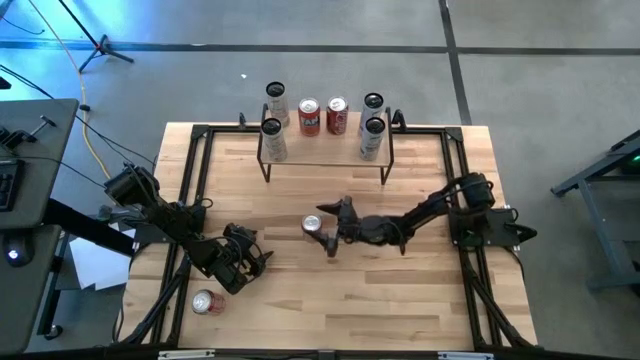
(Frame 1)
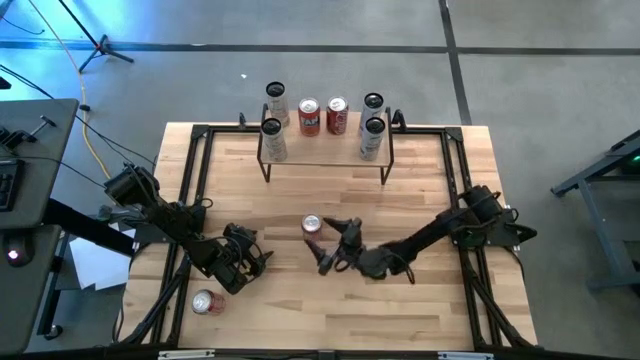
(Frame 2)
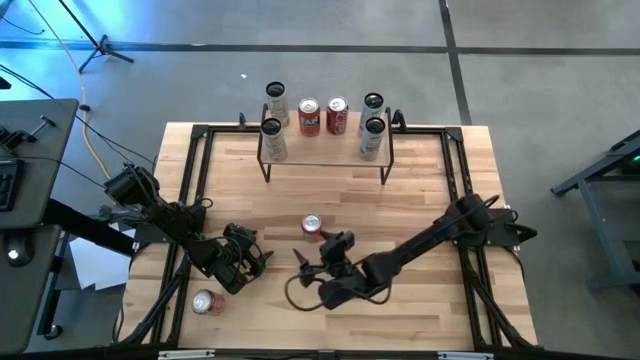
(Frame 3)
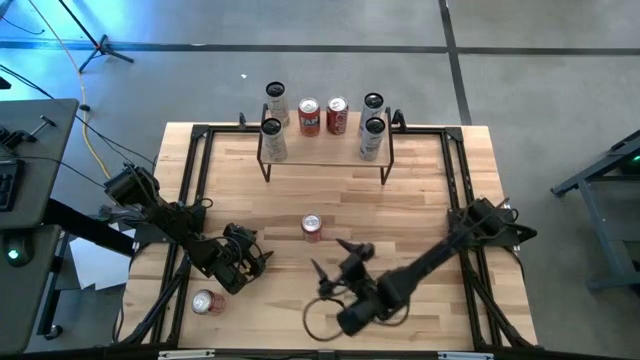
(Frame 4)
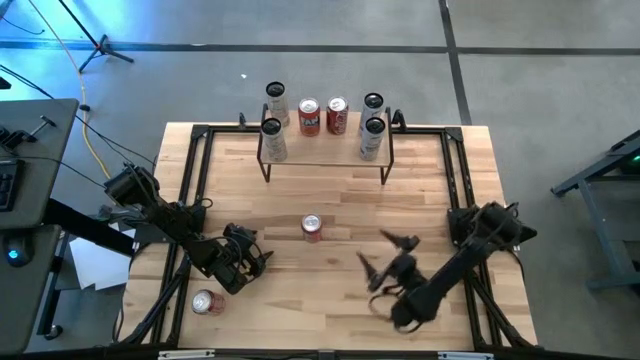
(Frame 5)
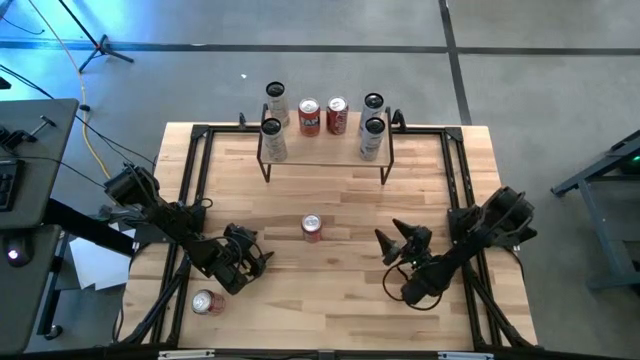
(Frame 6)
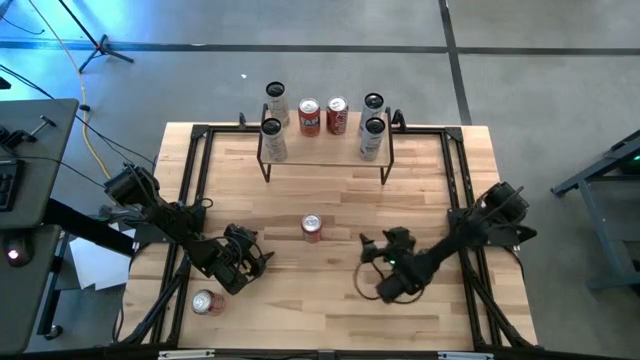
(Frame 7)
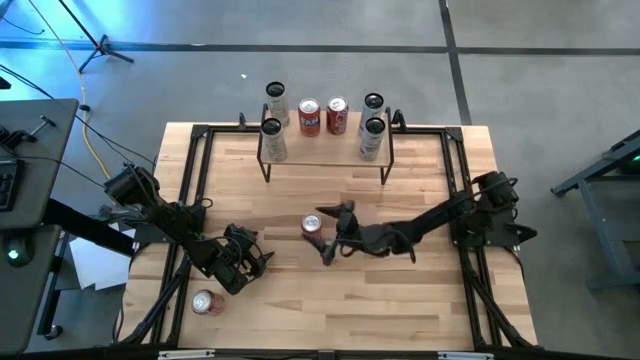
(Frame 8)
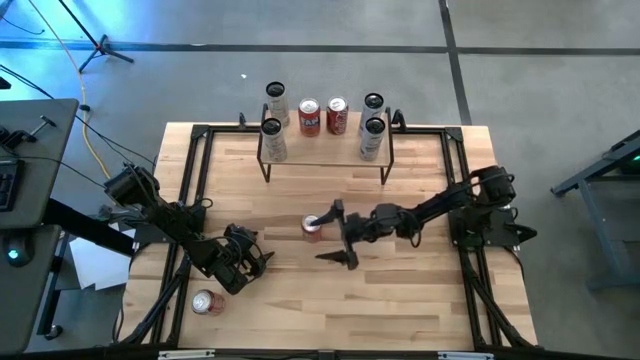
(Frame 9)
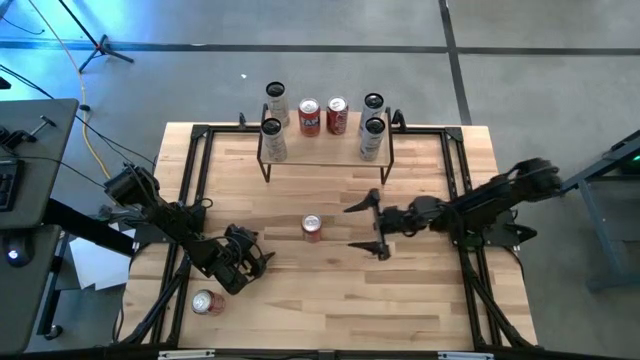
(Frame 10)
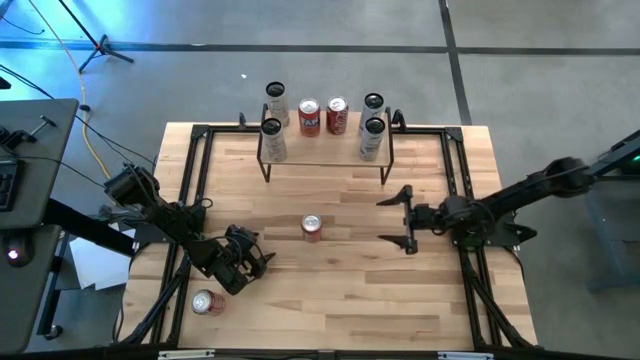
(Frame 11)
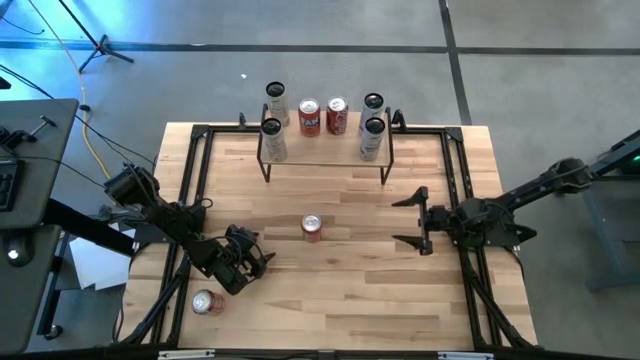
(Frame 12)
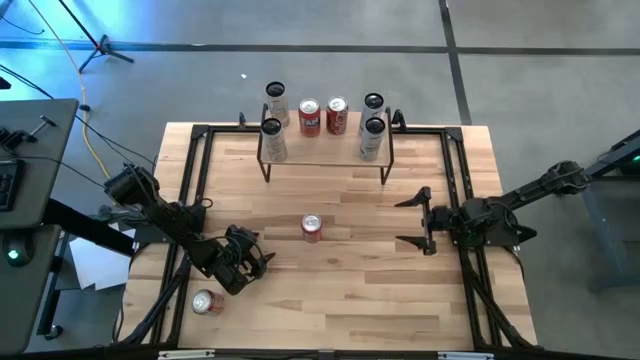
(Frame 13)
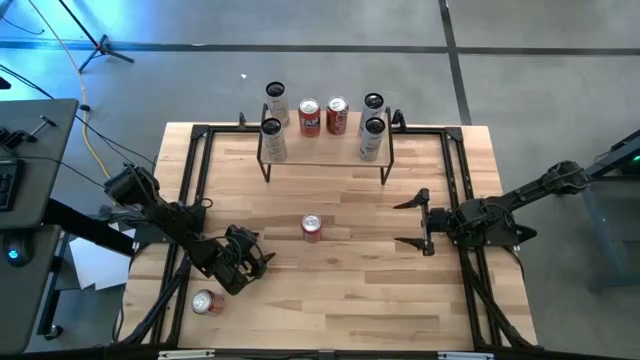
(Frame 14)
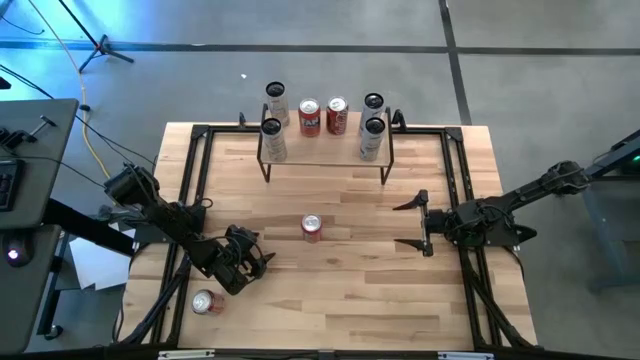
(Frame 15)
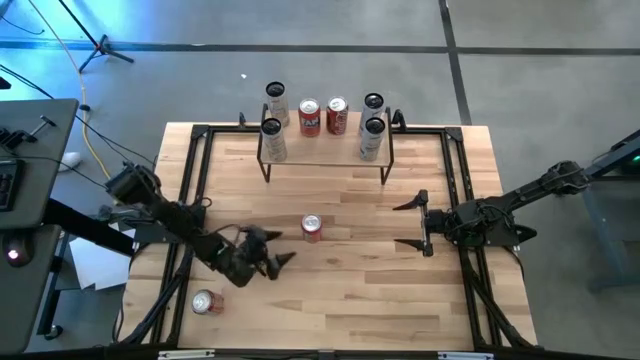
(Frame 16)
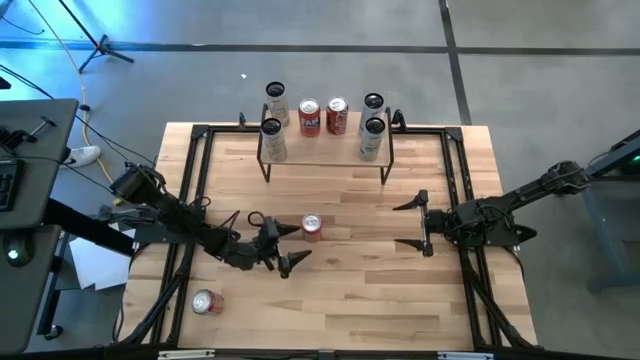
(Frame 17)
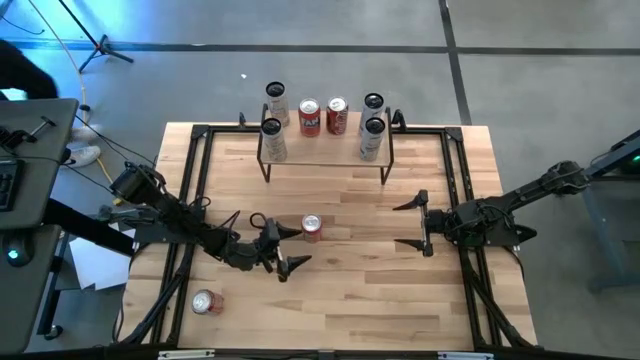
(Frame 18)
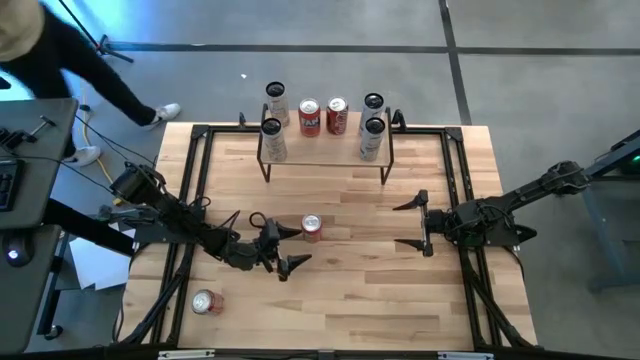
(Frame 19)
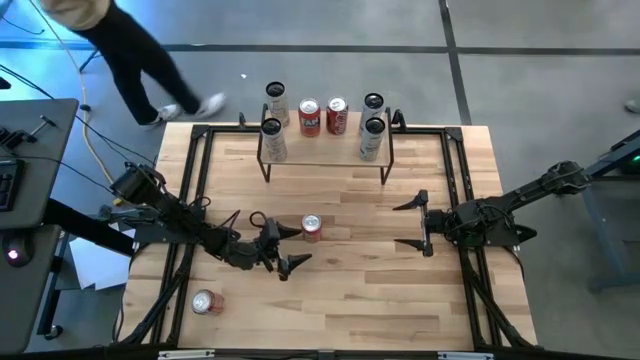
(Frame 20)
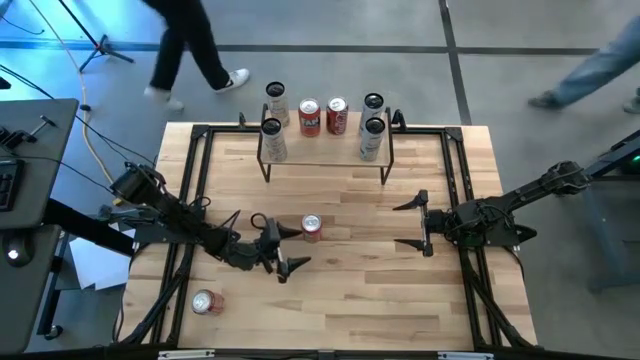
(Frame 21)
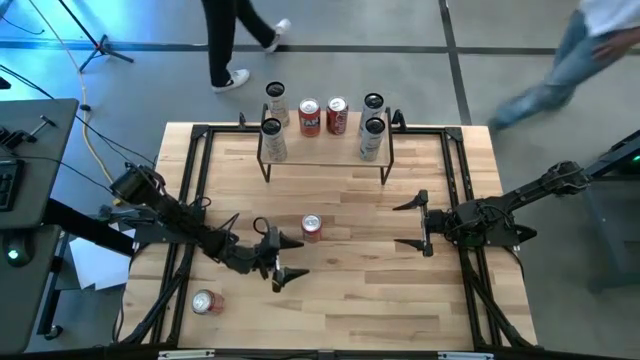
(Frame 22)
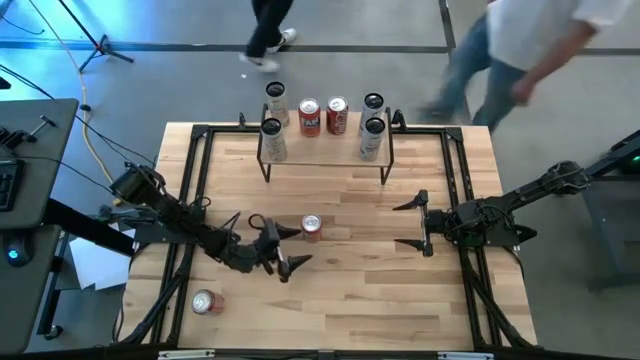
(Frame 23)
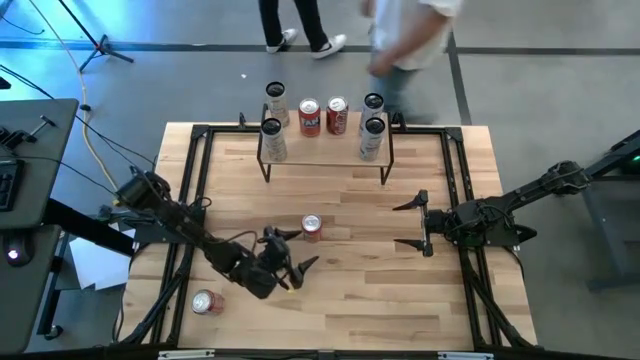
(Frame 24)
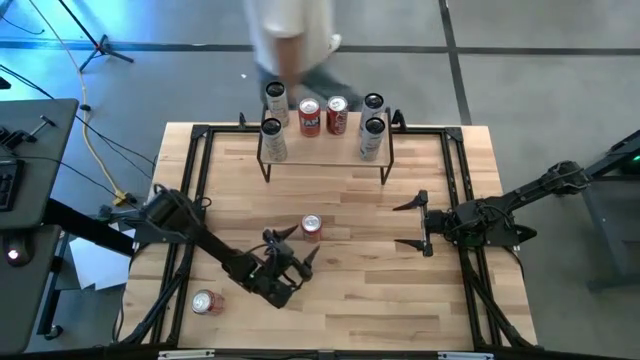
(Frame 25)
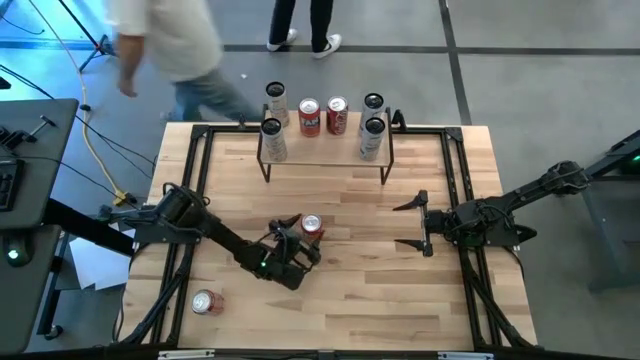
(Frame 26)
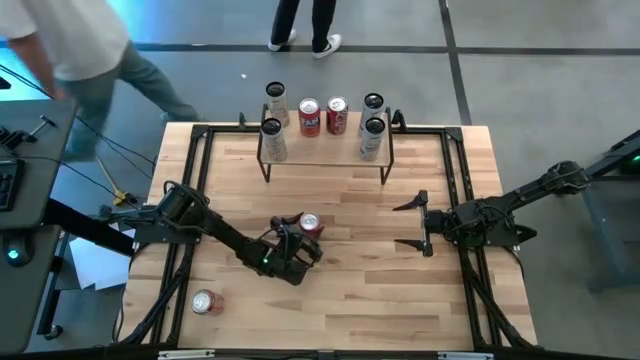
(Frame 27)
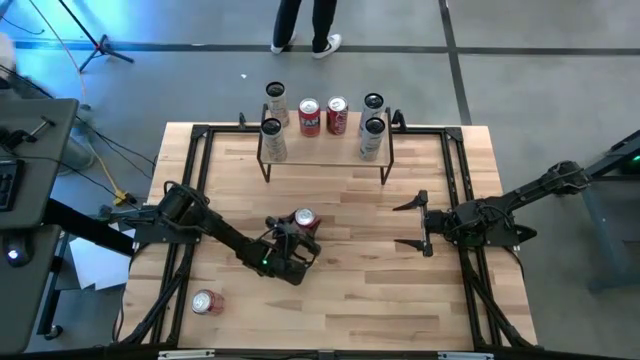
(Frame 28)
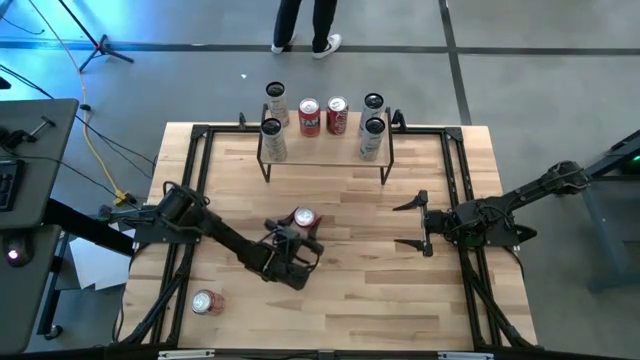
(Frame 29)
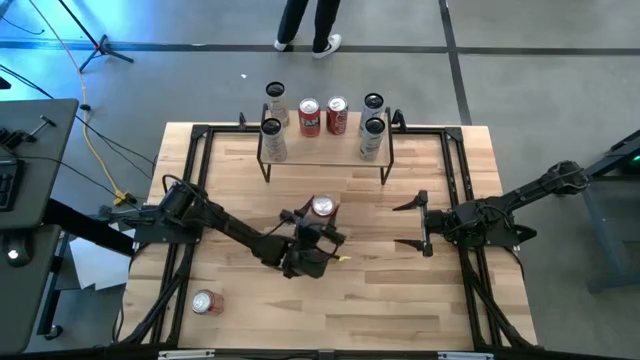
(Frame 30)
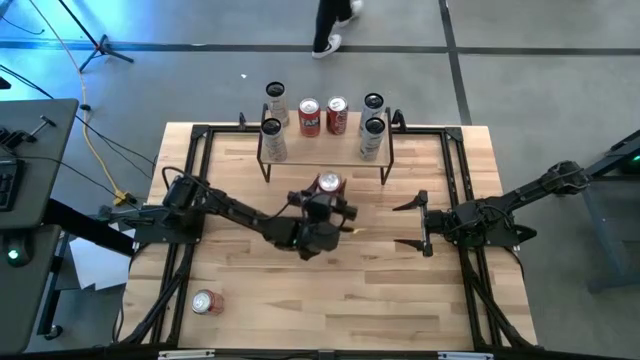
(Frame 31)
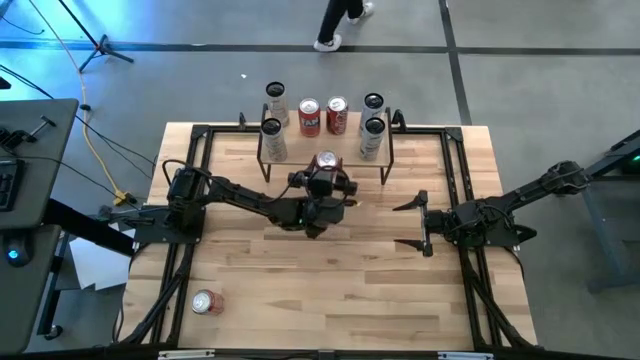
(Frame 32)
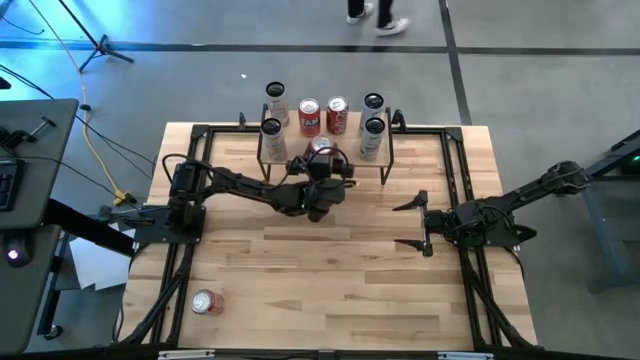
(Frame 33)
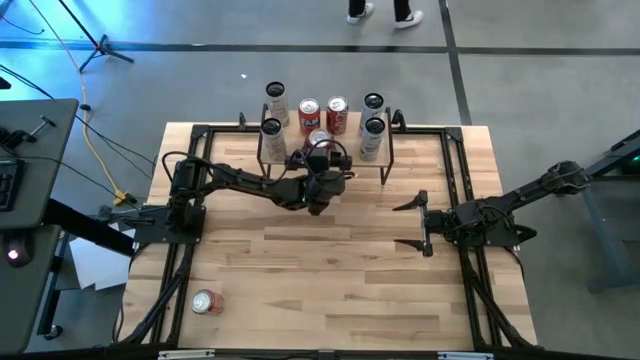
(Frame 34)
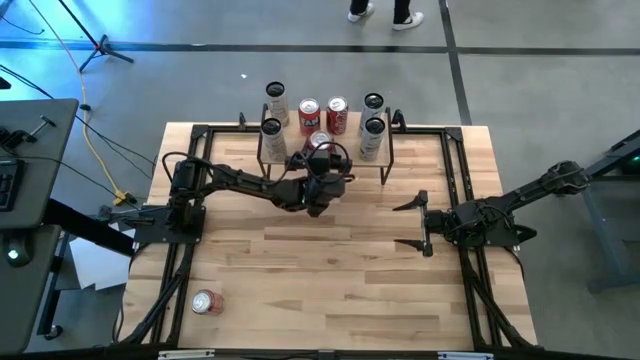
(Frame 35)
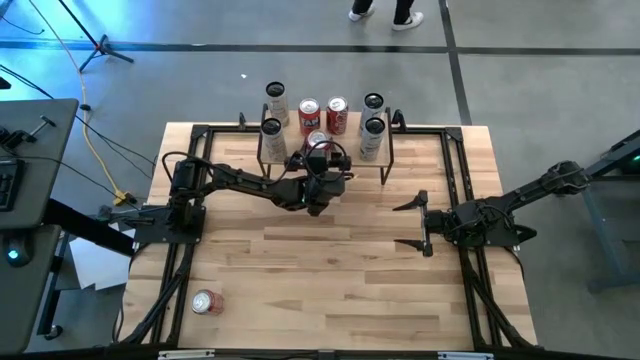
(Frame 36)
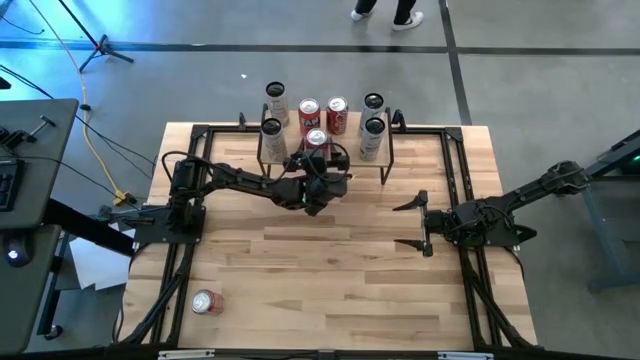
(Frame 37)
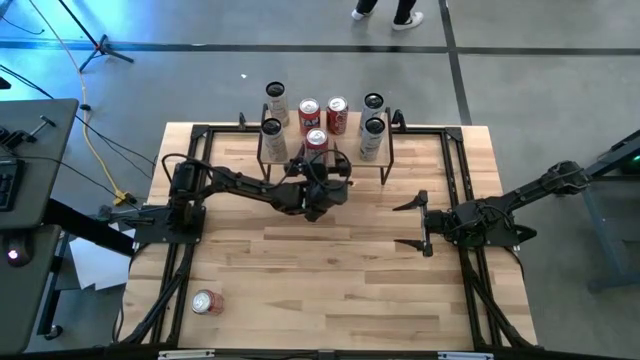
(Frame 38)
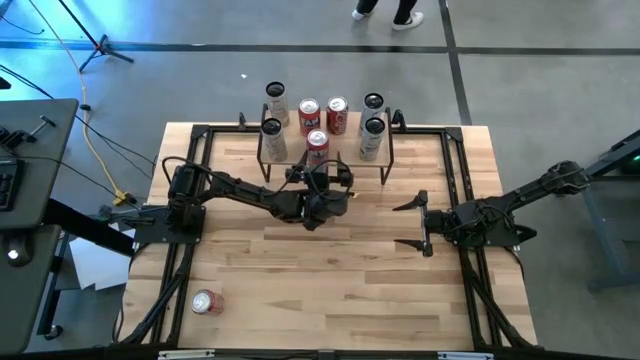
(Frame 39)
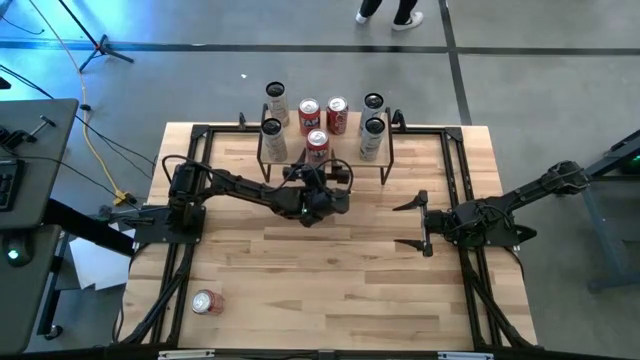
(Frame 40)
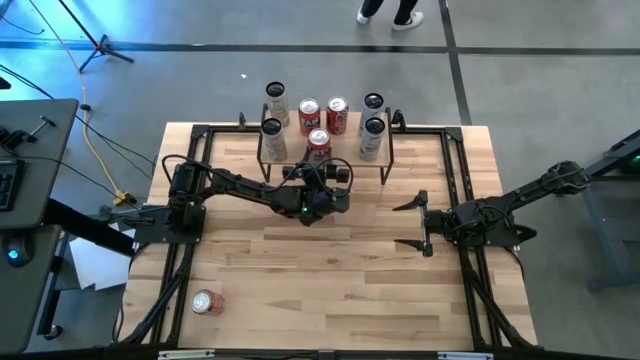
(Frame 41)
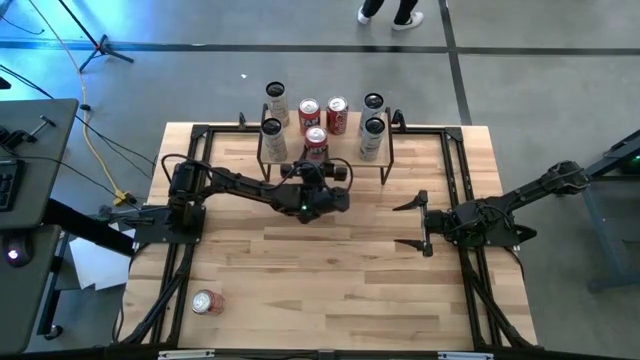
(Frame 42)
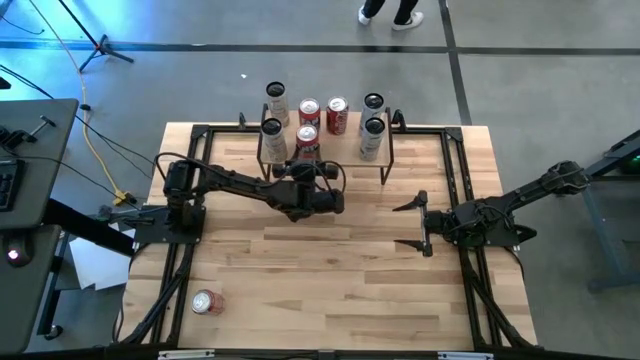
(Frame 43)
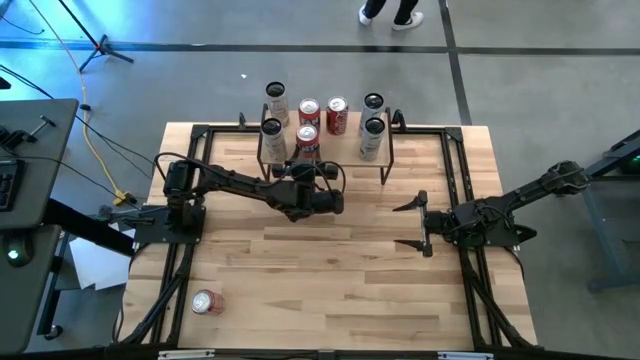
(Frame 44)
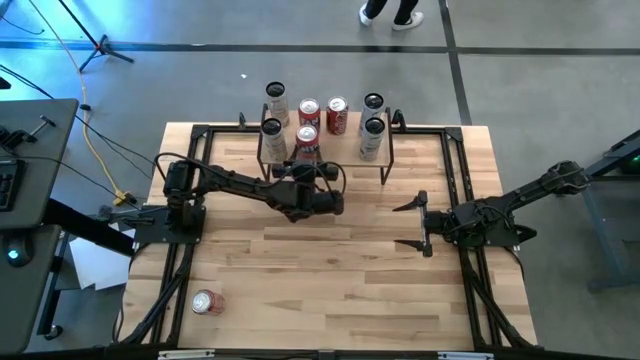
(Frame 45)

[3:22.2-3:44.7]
Task: Place canned beverage on shelf
Put the red soda can on the shelf aligned with the other red soda can
